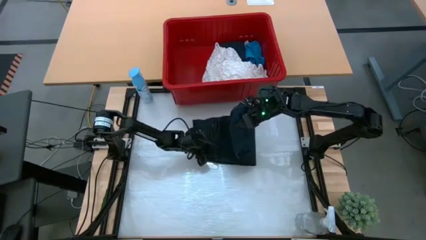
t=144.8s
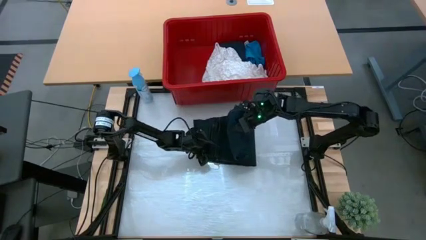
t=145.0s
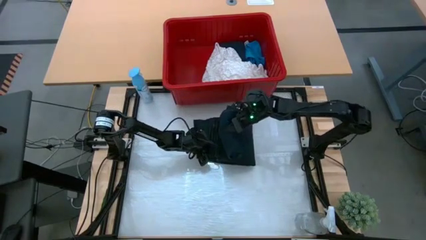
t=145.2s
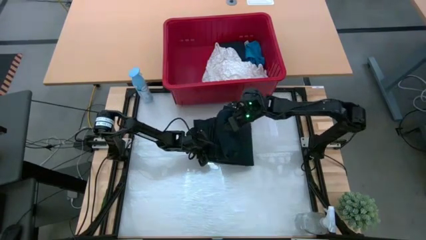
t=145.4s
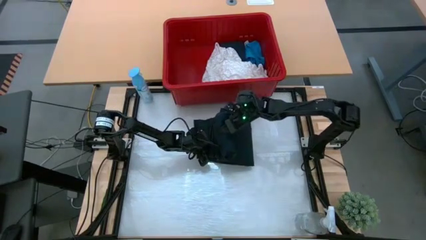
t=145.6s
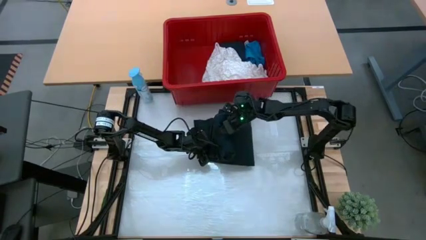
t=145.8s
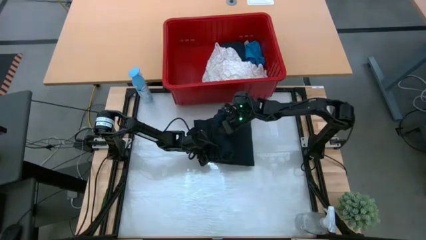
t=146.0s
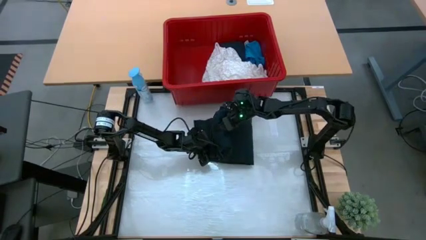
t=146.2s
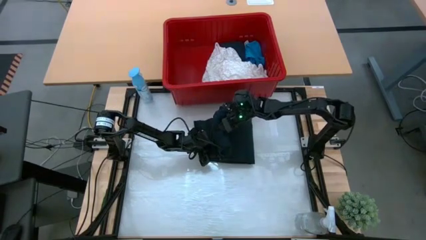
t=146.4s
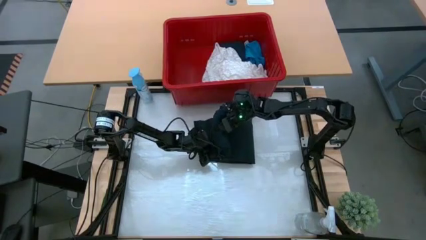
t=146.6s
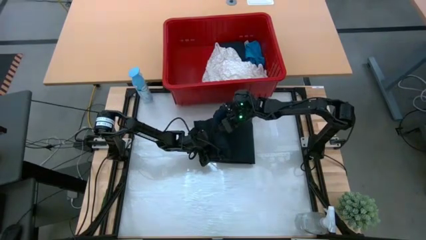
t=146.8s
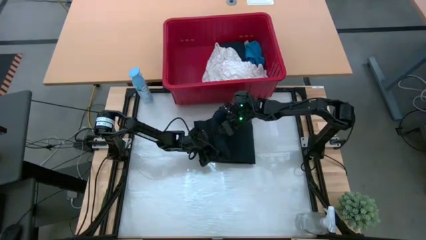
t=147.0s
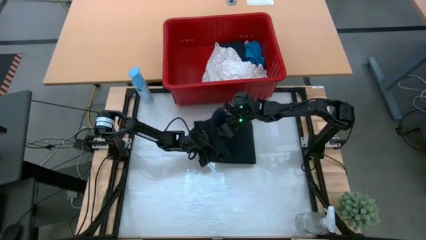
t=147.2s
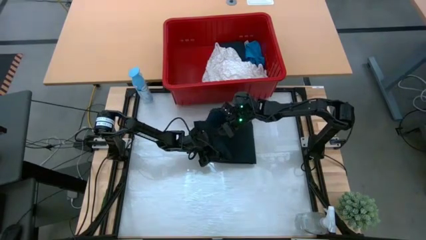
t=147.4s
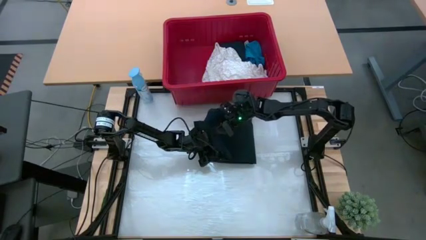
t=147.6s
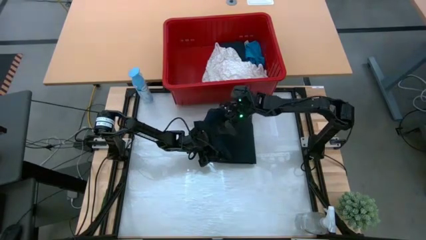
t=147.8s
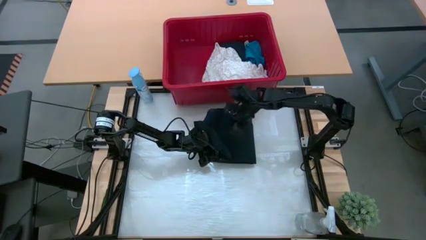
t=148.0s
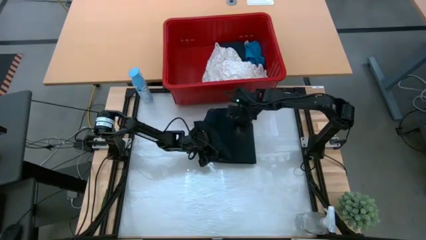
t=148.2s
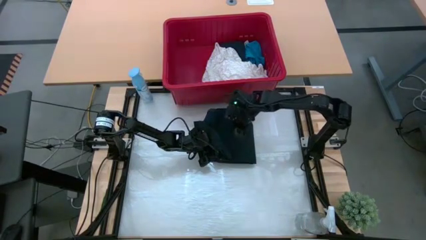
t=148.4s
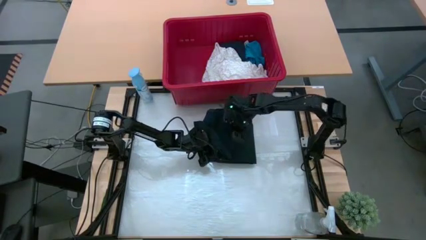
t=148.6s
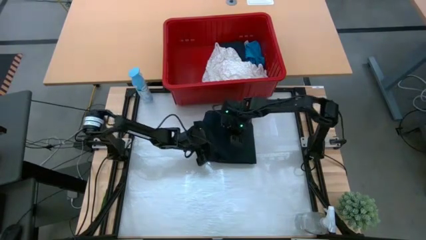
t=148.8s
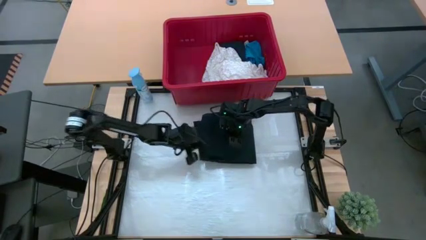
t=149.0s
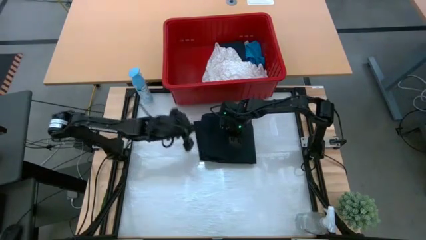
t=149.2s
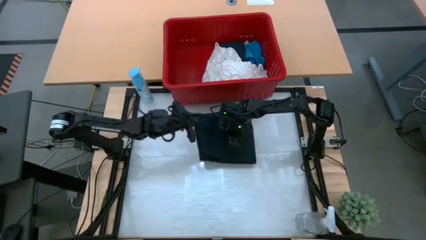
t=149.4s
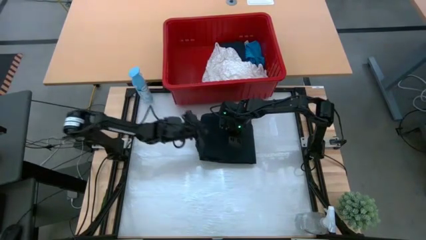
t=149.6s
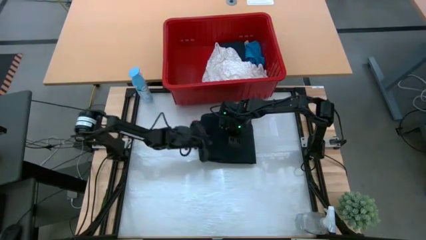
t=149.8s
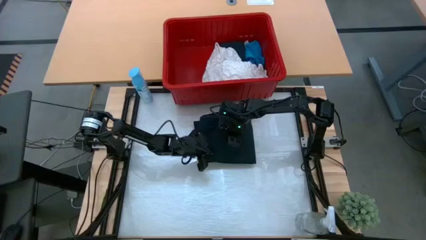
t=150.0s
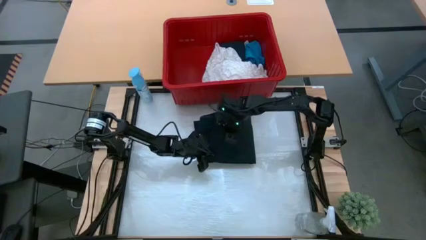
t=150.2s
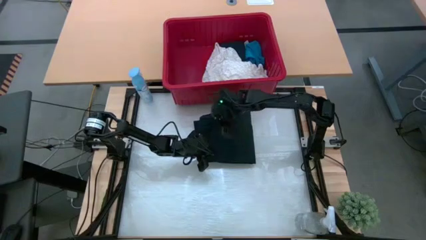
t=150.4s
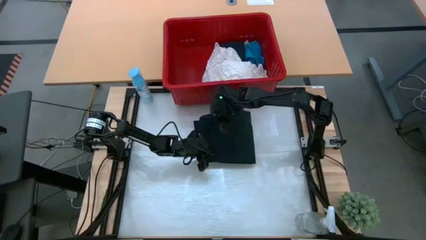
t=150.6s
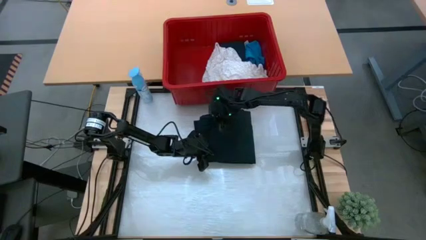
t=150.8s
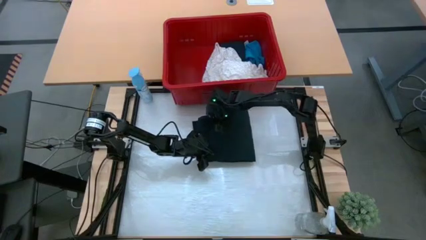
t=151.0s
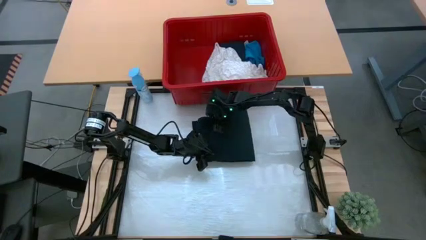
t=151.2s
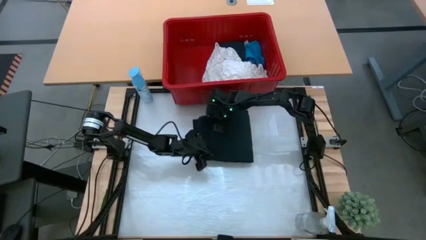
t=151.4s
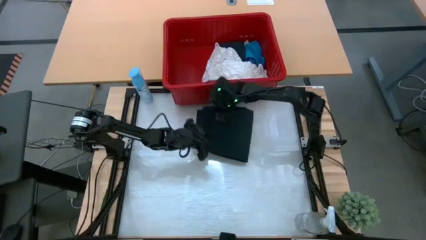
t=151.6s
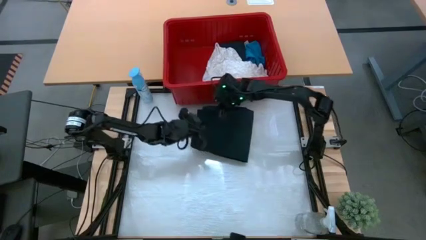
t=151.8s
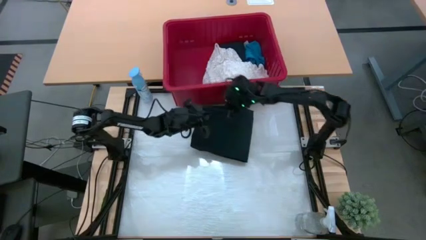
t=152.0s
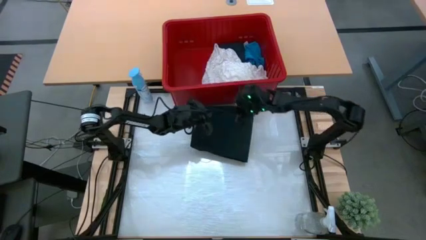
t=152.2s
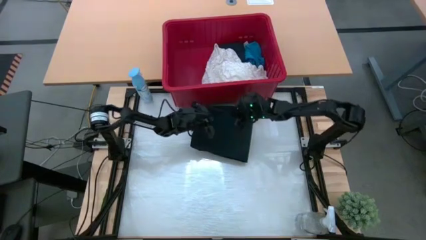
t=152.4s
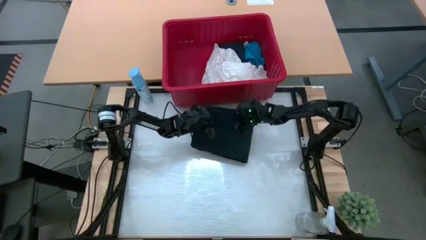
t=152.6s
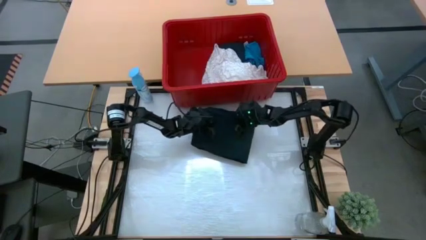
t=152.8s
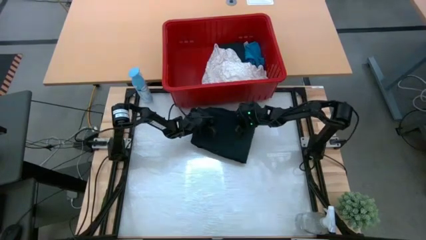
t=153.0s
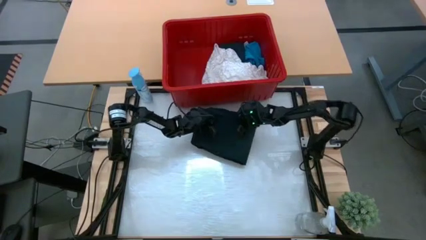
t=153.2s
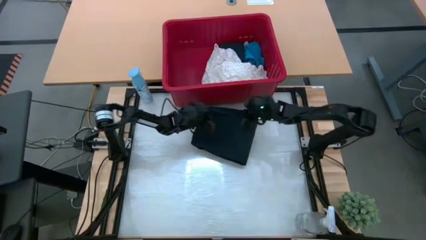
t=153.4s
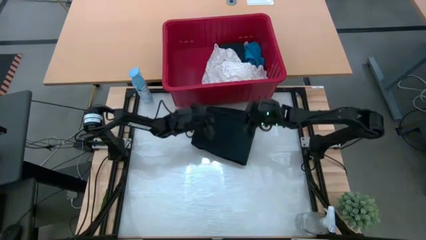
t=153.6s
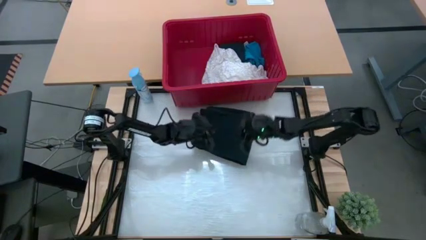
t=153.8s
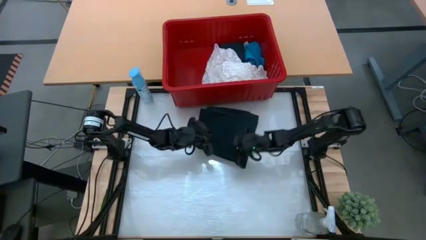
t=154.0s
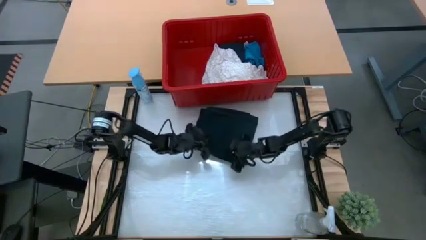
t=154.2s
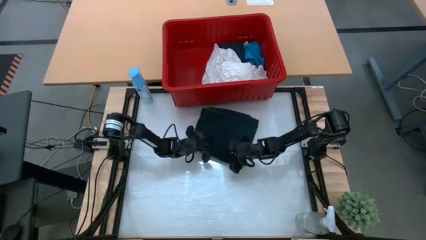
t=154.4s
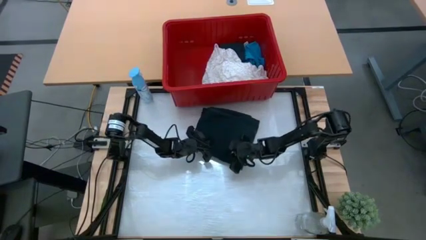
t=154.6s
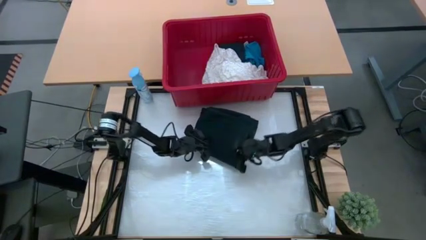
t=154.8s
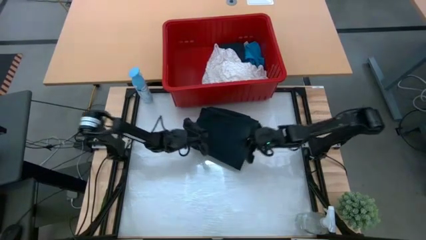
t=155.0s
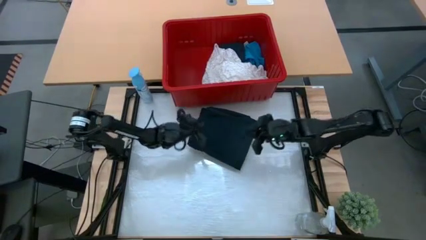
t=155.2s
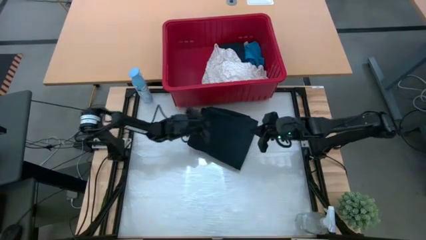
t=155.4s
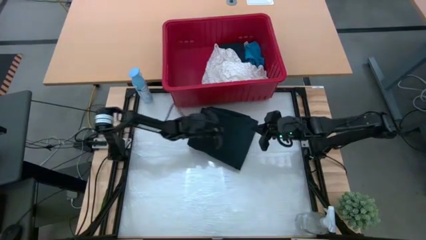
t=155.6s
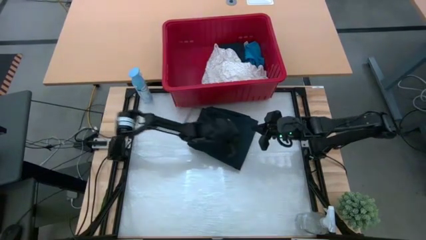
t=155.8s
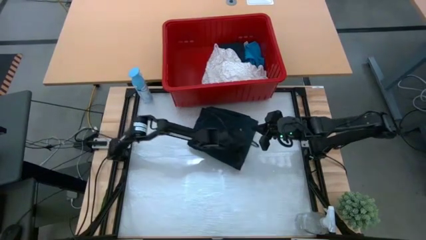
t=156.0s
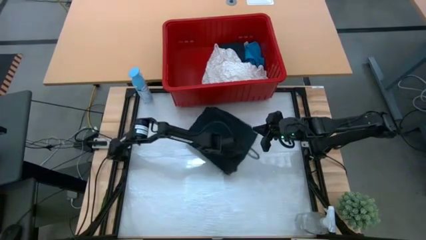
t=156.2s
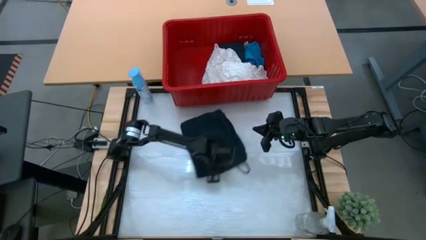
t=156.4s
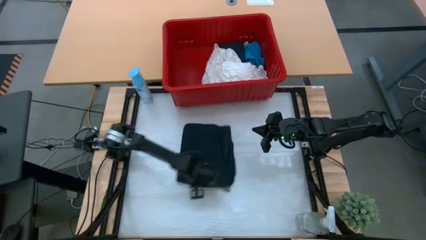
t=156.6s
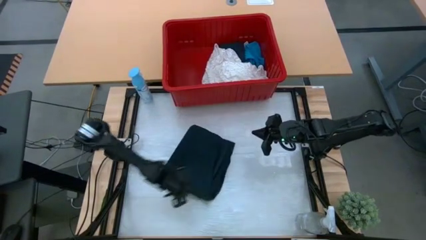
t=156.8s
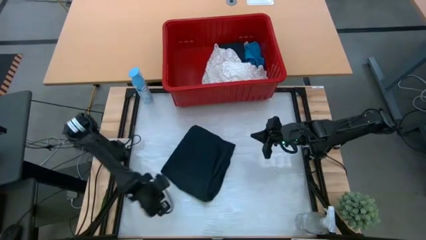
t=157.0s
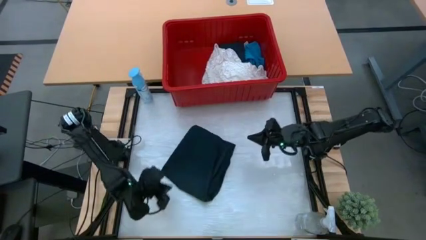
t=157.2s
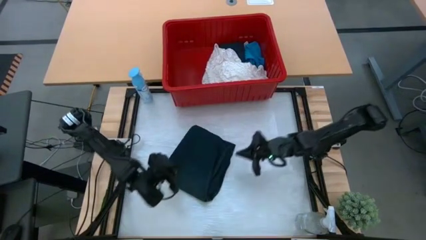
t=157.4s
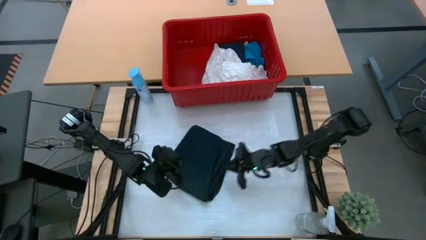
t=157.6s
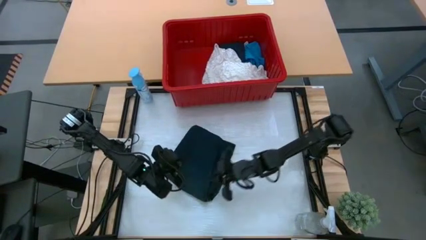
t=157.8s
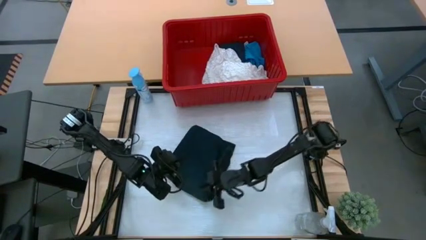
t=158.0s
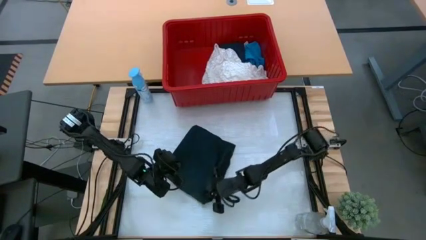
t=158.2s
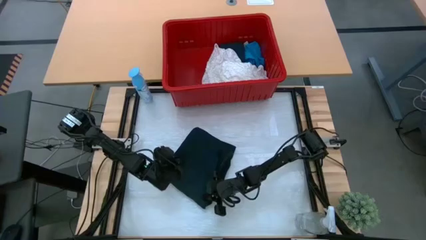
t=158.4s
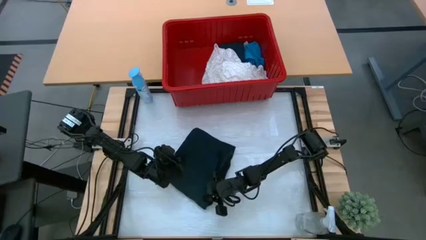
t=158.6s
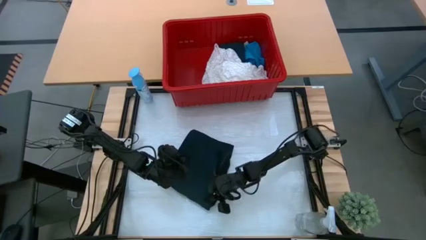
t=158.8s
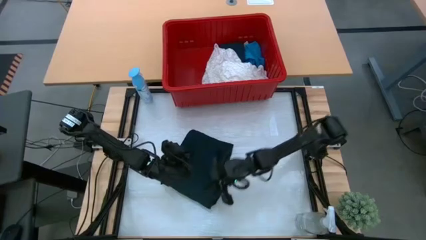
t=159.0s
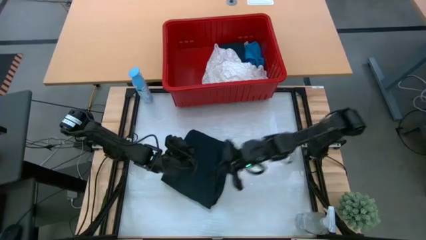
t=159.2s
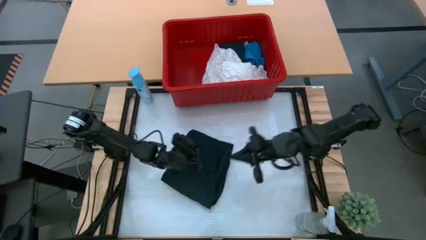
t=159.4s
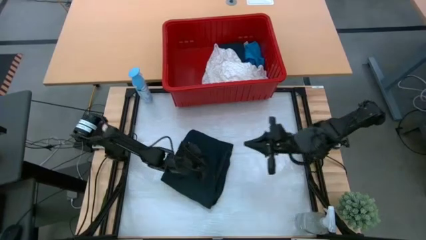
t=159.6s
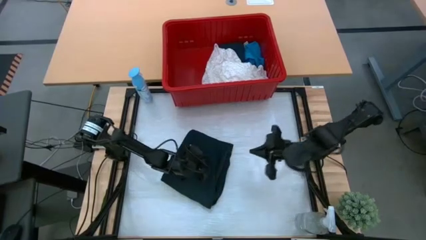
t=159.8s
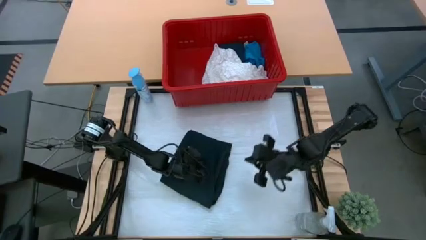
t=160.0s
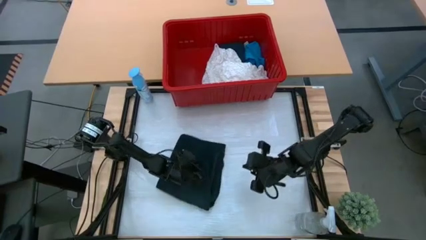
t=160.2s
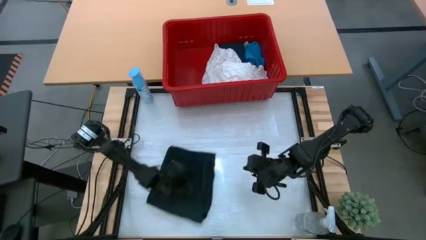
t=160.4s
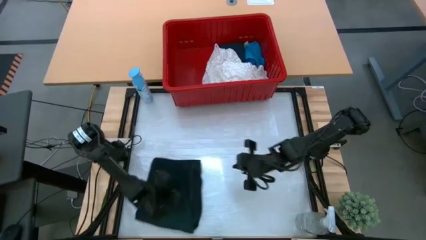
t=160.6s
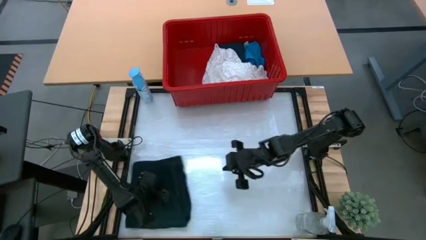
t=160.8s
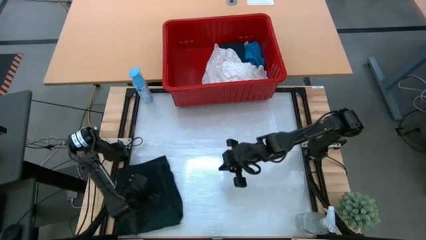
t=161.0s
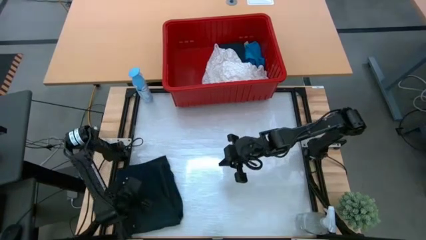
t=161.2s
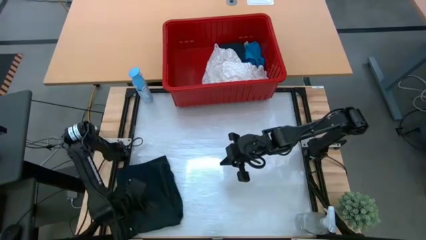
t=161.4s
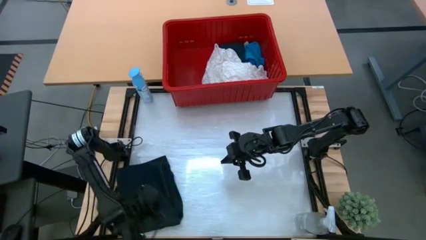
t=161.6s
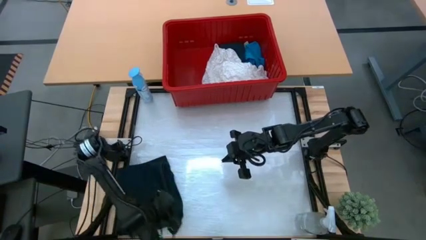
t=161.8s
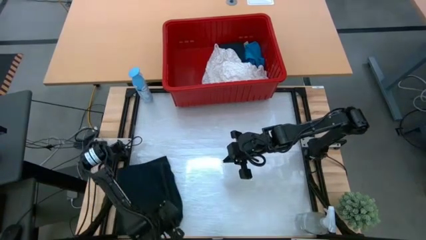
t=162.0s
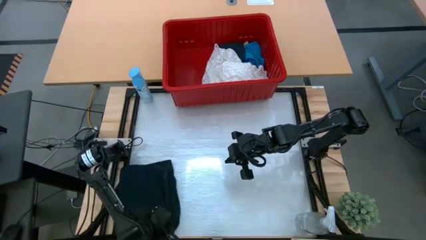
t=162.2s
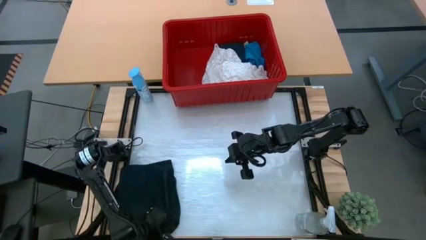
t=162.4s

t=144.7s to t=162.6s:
Task: Fold Laundry from Bin
Fold the black pants from the red bin
